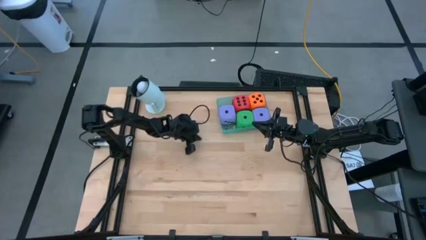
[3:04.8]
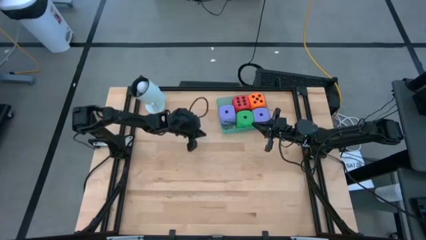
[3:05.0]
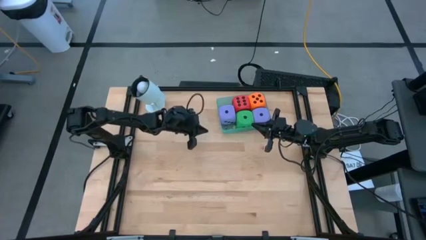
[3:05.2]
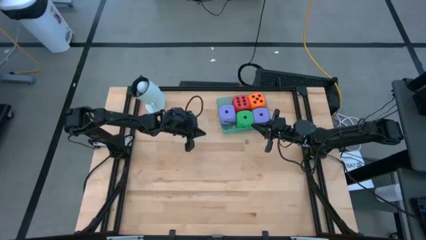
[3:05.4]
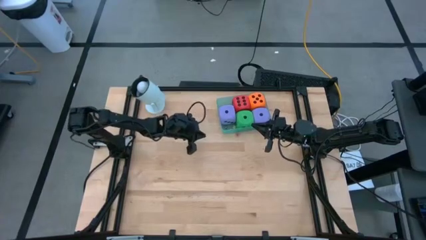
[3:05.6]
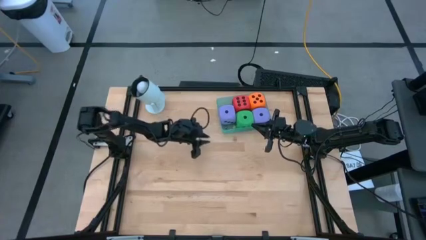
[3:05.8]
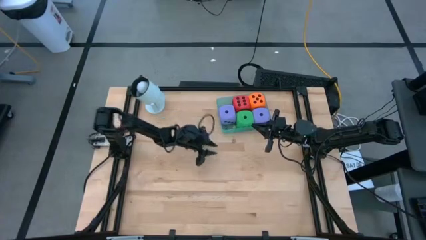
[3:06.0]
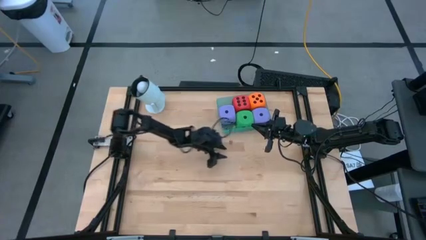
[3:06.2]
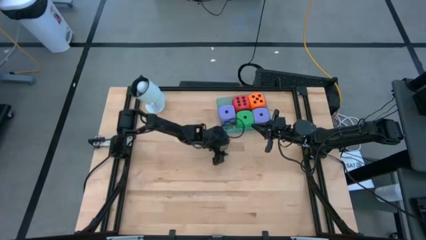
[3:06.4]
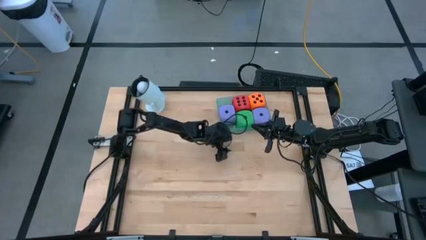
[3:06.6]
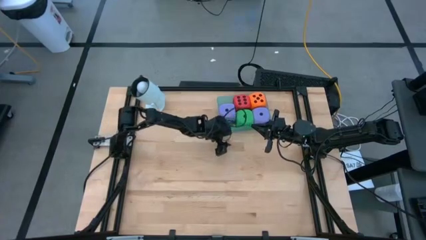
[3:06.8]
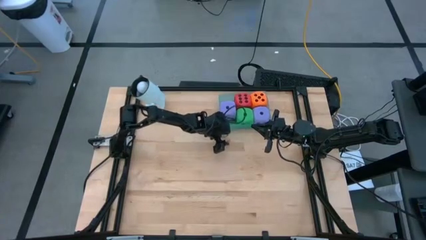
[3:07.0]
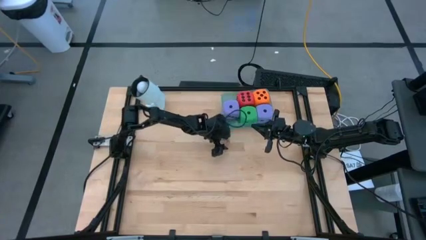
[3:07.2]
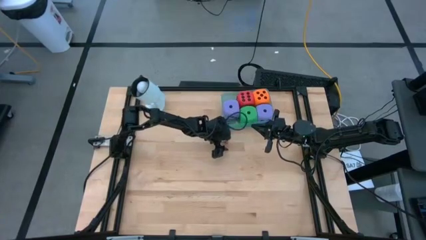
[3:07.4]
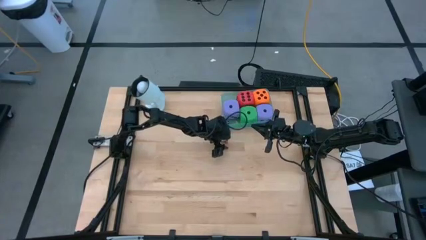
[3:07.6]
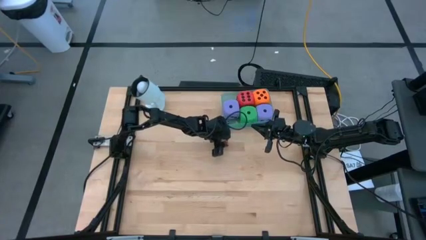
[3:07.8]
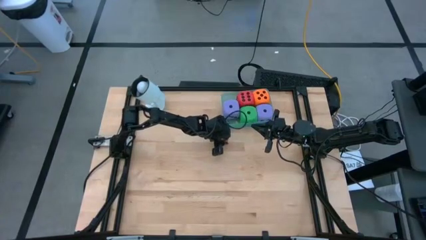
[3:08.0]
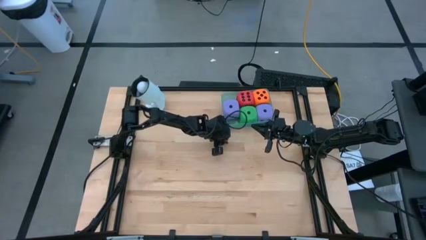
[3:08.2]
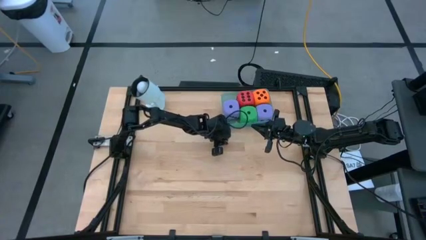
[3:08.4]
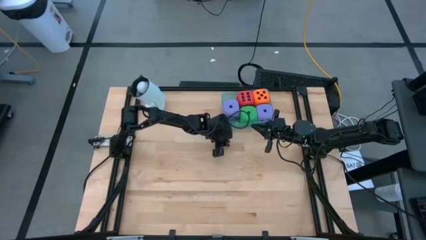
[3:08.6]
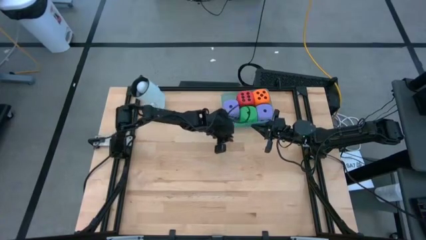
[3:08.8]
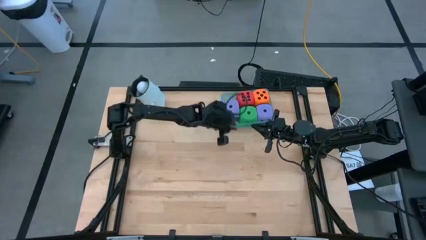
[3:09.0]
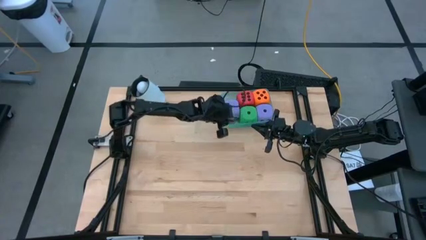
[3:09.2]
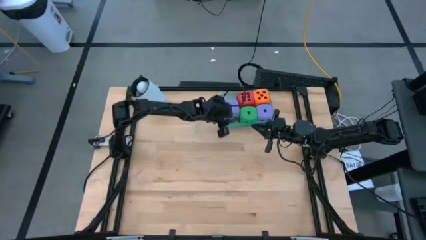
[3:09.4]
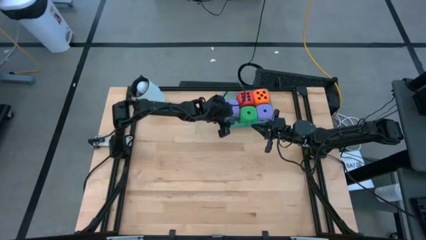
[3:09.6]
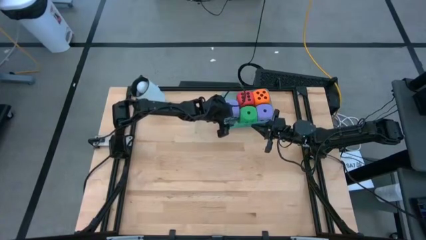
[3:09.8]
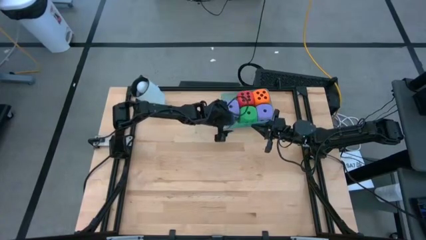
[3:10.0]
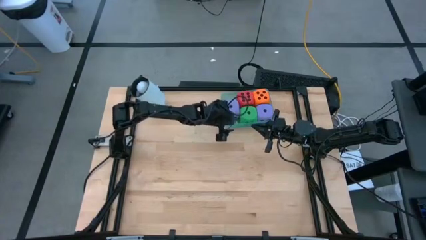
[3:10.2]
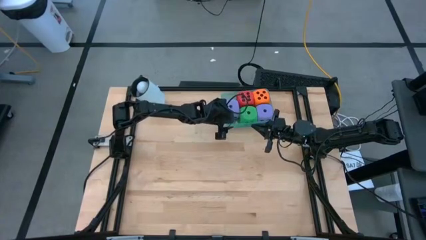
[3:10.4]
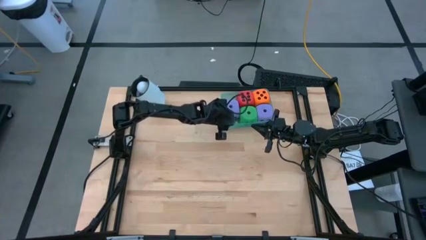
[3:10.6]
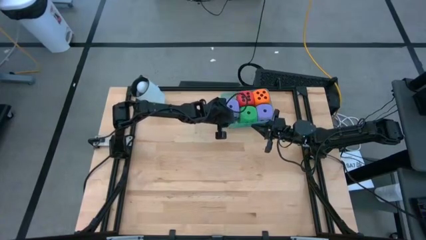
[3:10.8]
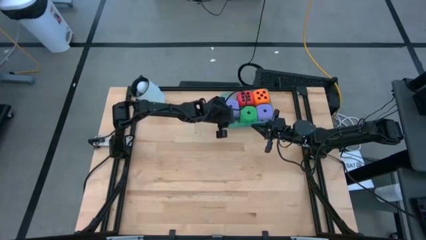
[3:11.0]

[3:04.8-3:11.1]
Task: Pick & Place Dice
Put the small red dice into the bin

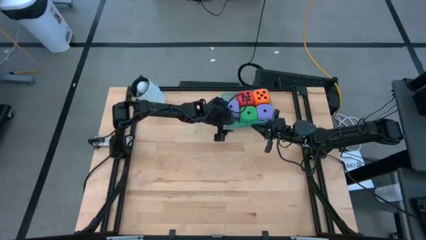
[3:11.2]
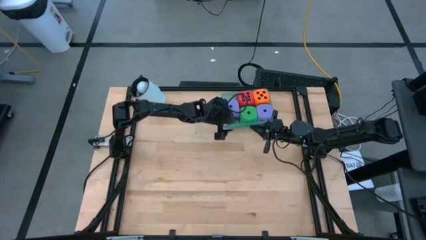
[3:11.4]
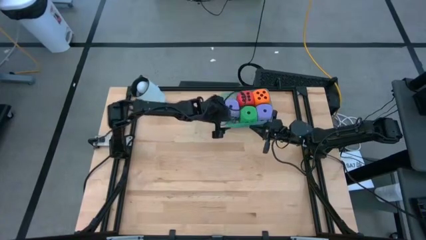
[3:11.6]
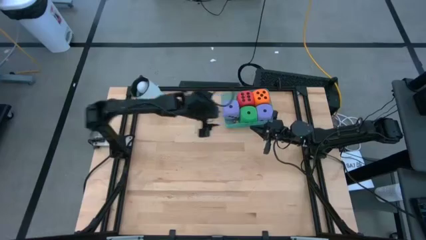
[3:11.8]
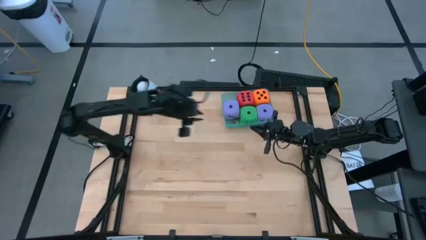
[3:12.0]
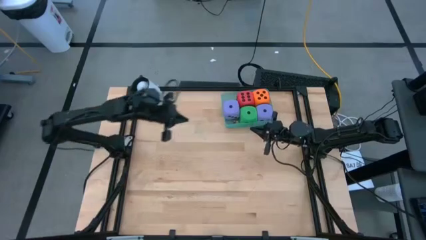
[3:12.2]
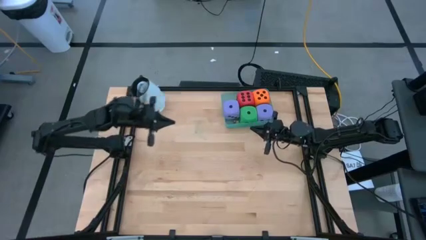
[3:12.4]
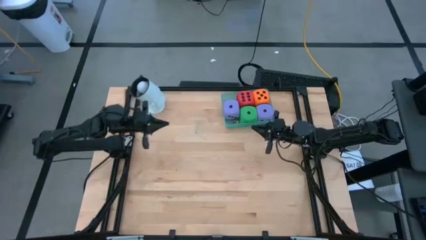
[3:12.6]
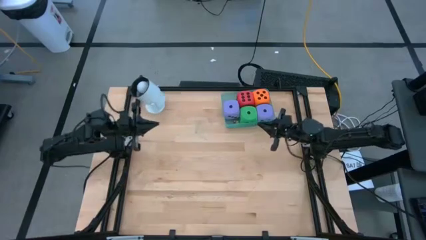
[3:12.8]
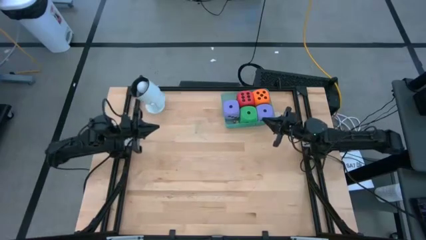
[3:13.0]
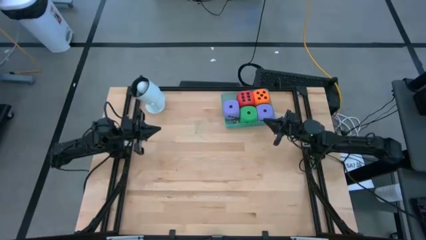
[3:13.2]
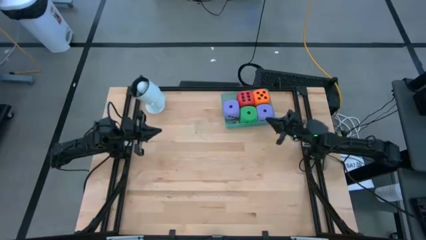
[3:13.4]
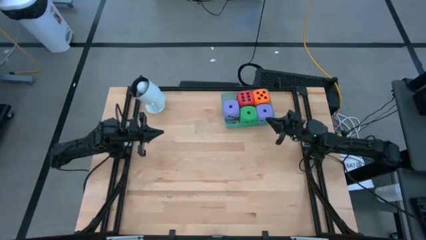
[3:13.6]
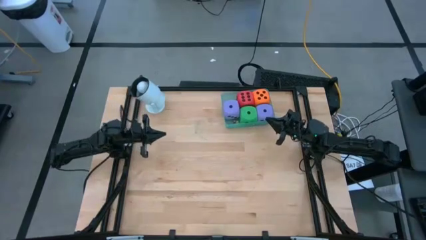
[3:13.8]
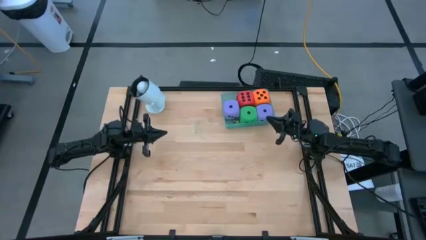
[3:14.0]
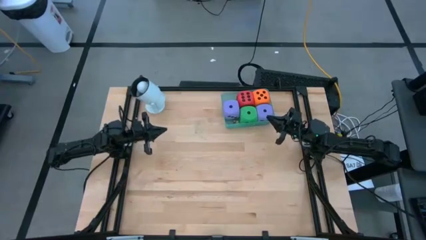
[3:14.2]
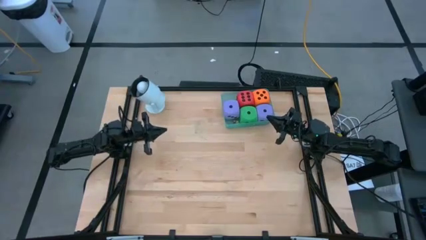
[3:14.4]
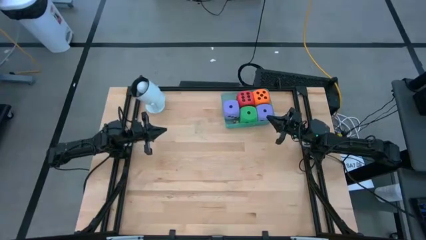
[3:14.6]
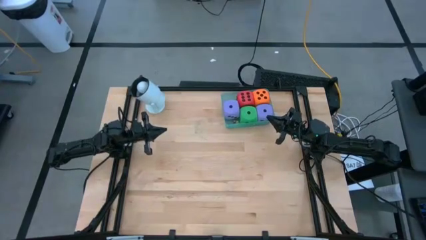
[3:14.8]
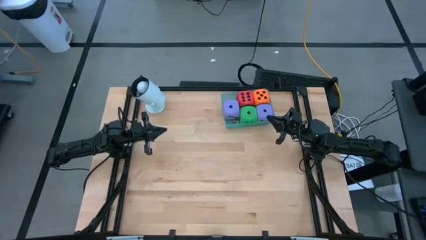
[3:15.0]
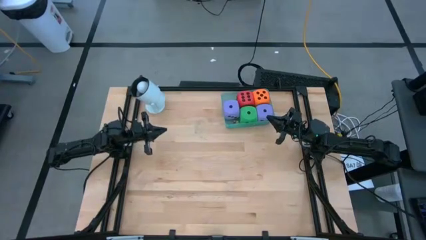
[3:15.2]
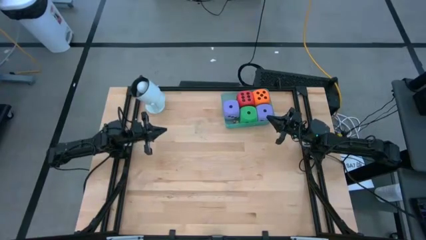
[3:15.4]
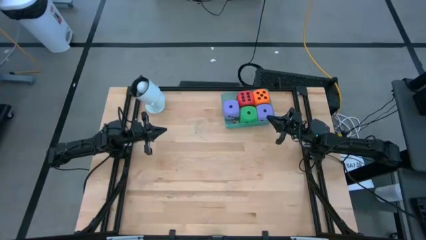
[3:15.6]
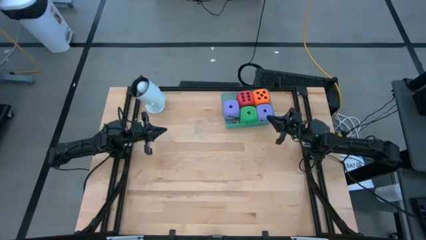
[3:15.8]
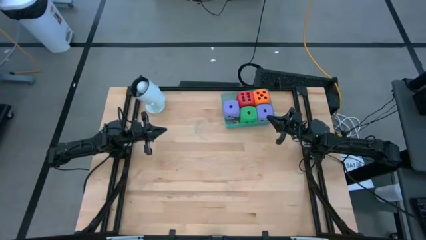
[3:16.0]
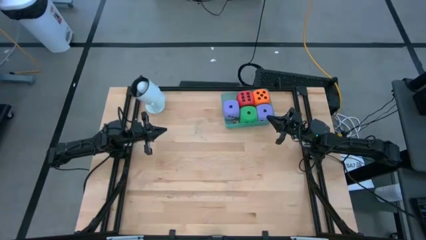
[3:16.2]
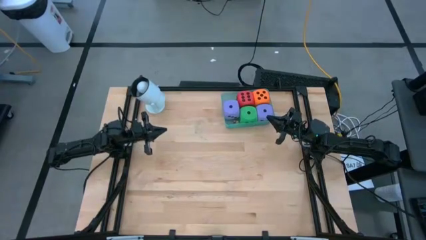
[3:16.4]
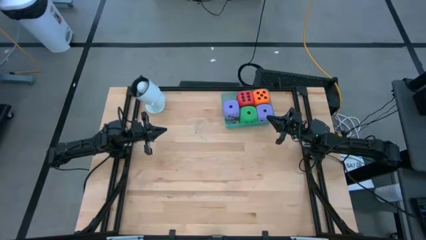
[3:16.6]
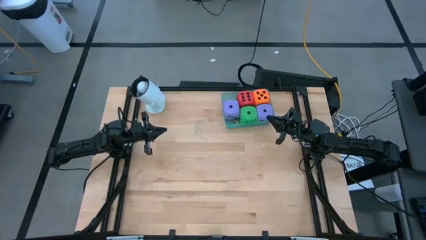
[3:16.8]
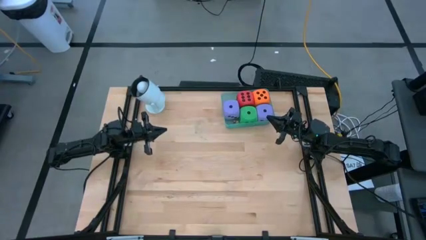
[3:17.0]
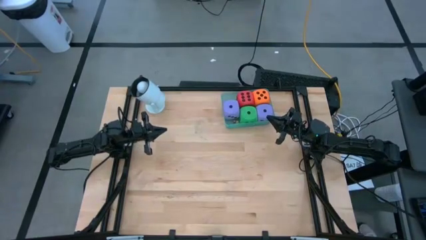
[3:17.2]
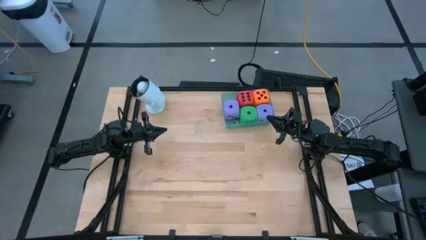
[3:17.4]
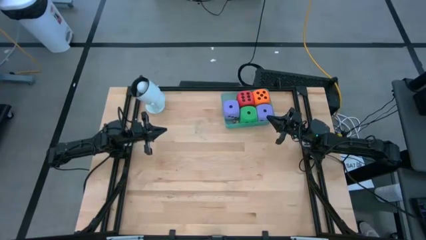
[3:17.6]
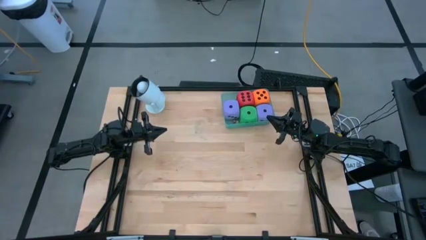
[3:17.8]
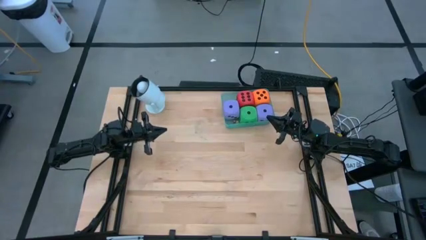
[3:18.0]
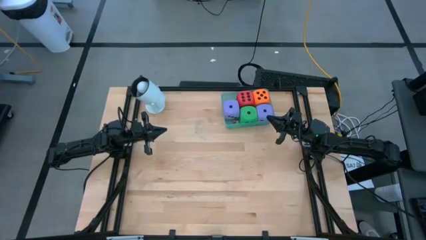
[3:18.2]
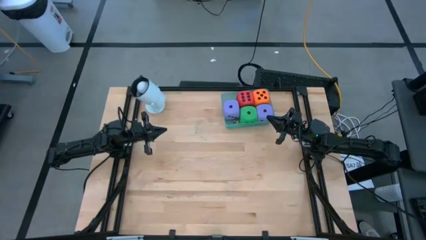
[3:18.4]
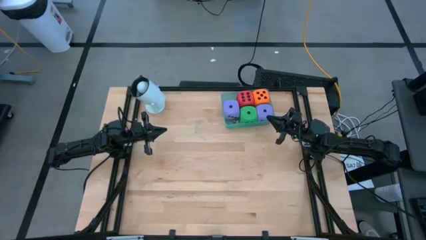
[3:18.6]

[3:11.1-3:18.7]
Return to Home Position

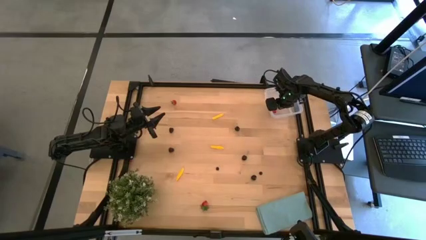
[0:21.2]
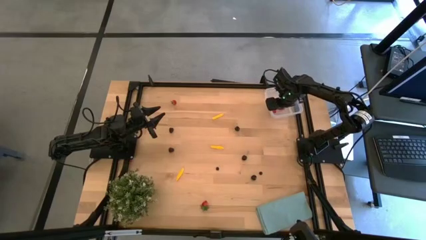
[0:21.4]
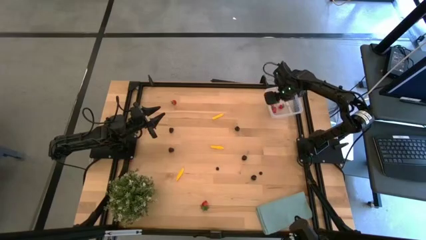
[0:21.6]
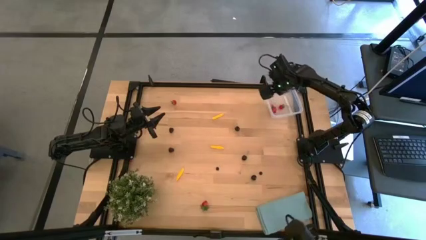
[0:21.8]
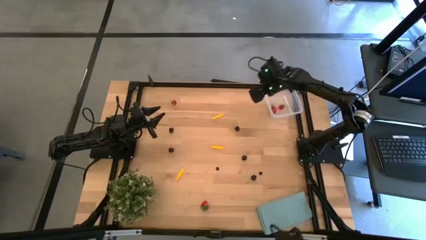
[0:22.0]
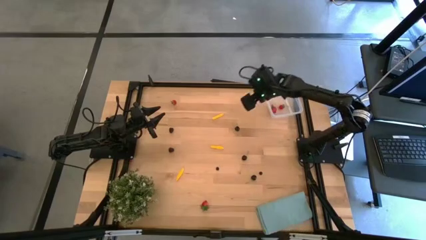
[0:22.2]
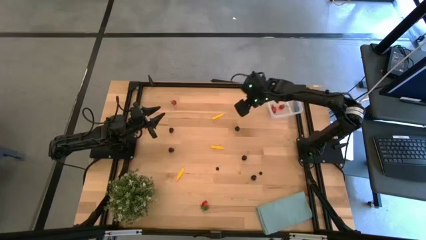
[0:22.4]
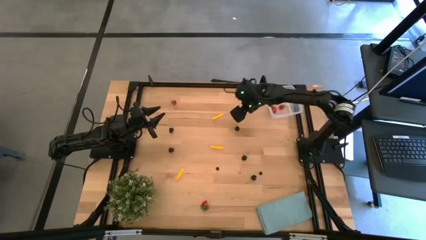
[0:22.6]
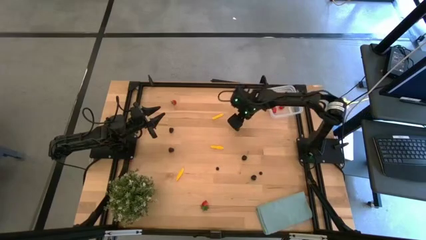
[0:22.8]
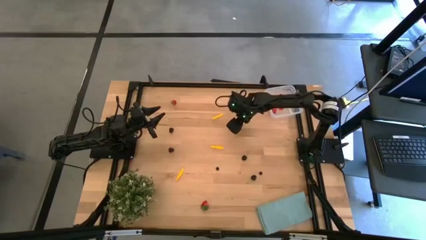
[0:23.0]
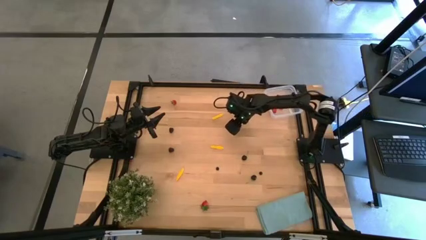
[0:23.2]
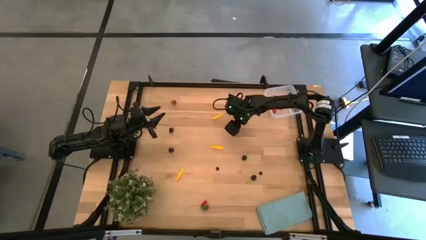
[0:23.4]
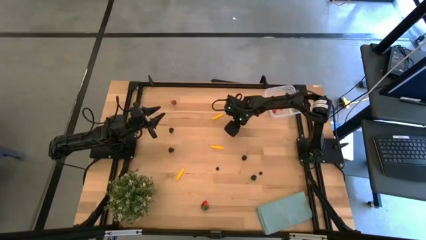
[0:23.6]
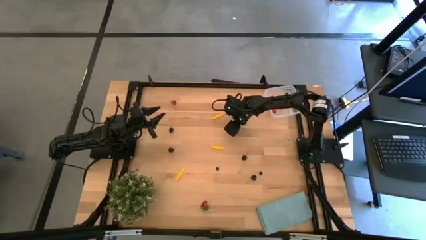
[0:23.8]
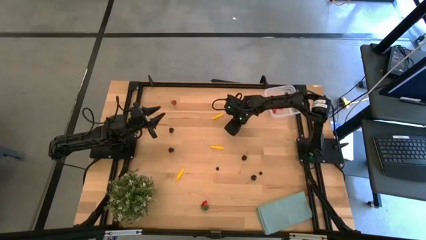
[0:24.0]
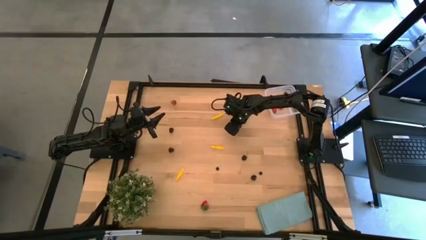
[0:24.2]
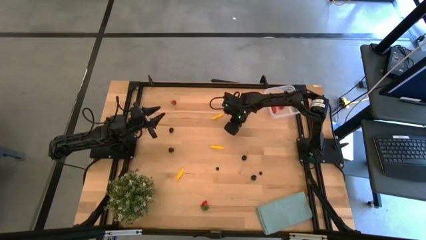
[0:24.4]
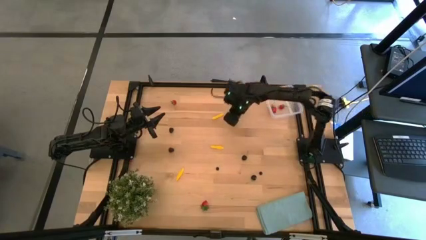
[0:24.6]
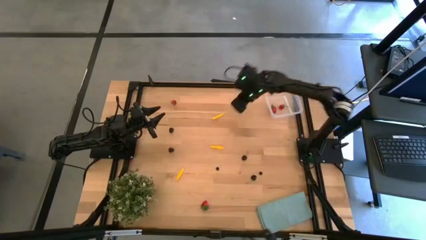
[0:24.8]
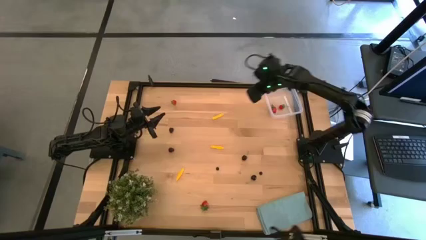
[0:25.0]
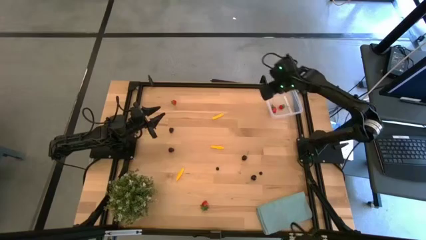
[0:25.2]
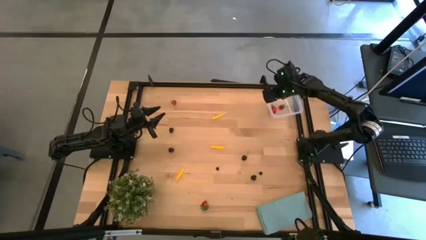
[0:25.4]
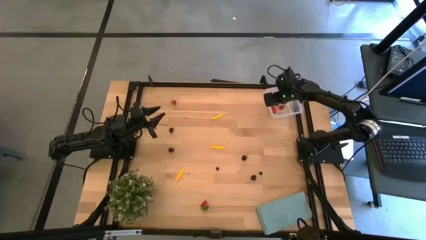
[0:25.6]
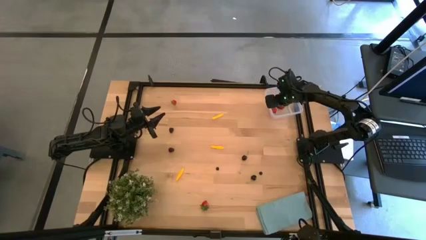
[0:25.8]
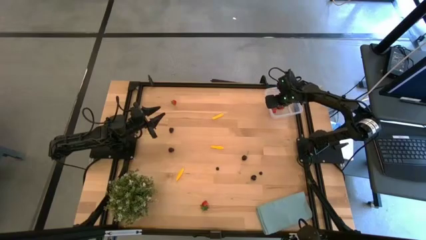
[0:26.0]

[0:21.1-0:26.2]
Task: Pick and placing Produce into tupperware
Put the black cherry into the transparent bin
